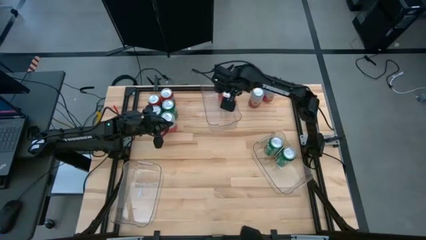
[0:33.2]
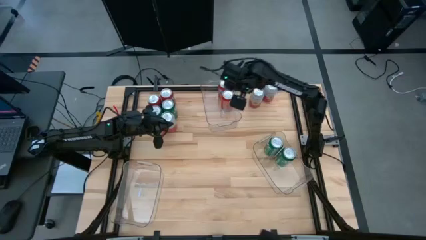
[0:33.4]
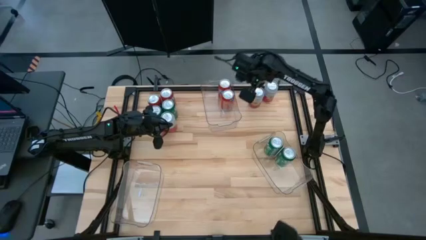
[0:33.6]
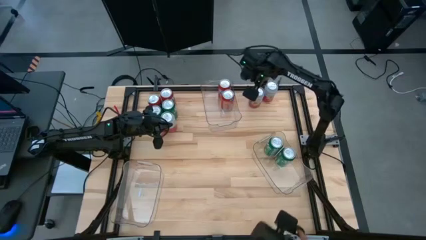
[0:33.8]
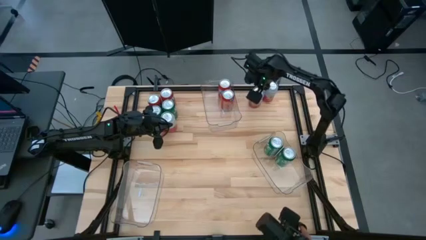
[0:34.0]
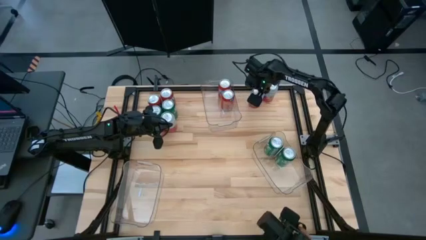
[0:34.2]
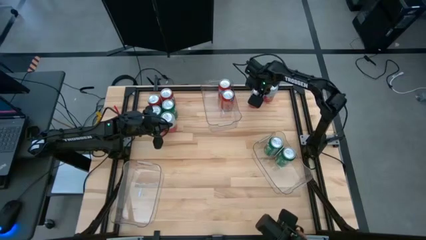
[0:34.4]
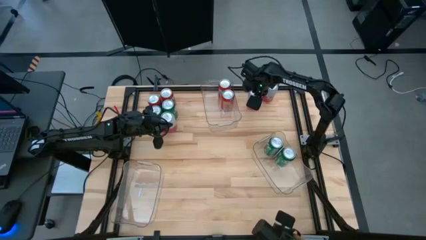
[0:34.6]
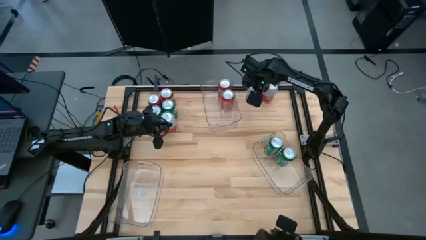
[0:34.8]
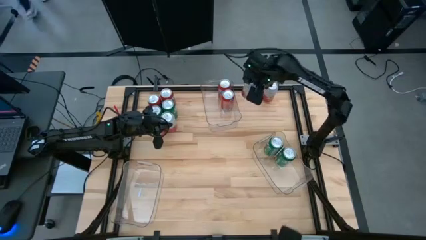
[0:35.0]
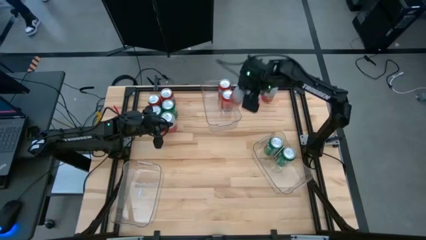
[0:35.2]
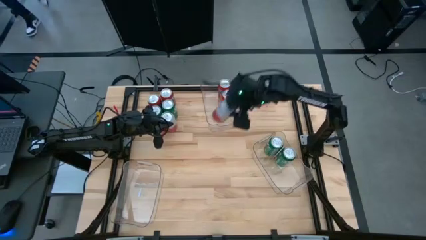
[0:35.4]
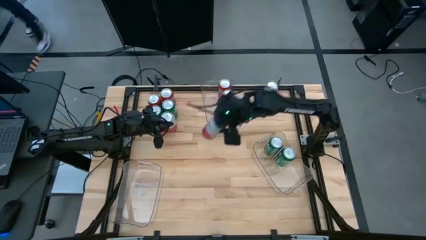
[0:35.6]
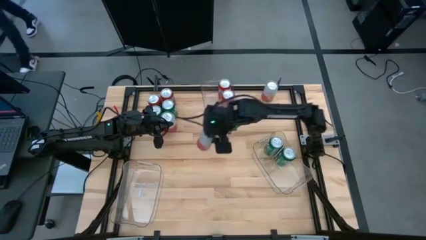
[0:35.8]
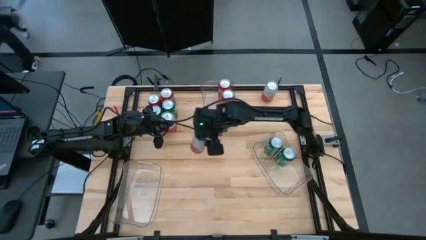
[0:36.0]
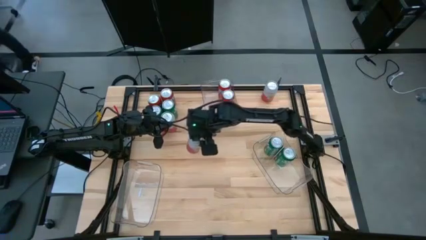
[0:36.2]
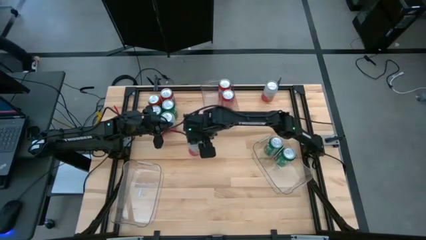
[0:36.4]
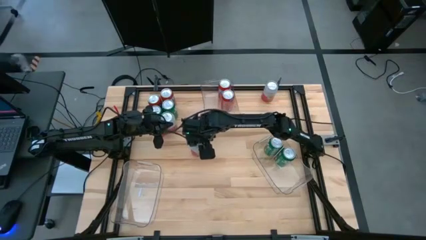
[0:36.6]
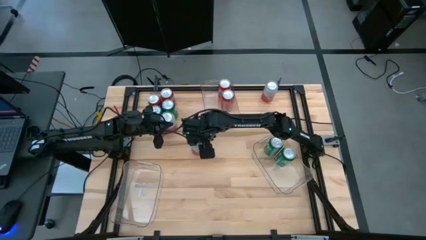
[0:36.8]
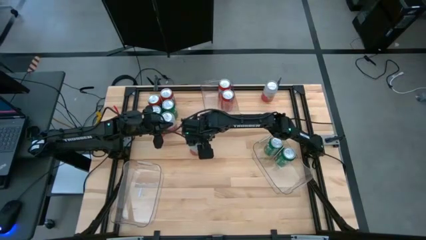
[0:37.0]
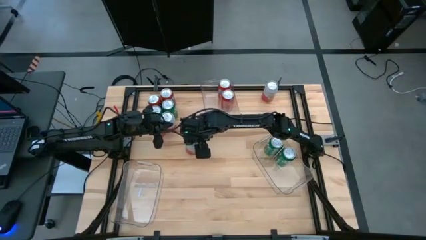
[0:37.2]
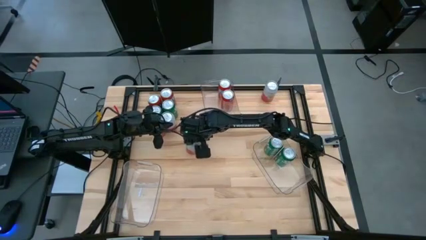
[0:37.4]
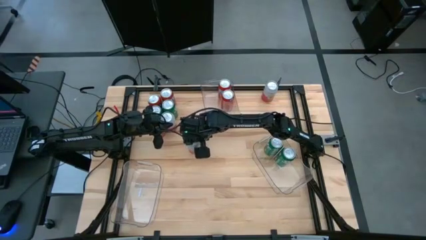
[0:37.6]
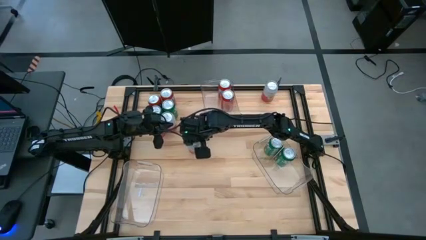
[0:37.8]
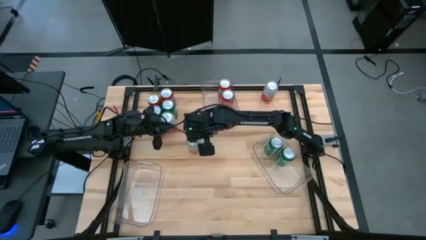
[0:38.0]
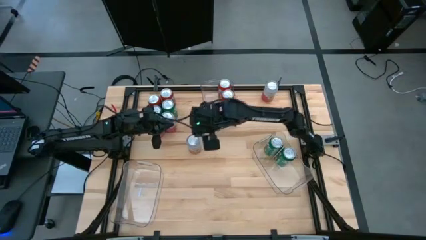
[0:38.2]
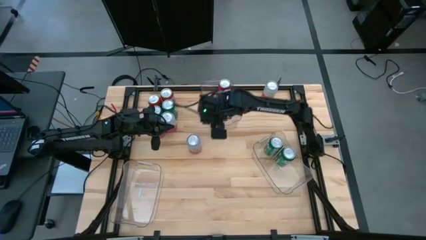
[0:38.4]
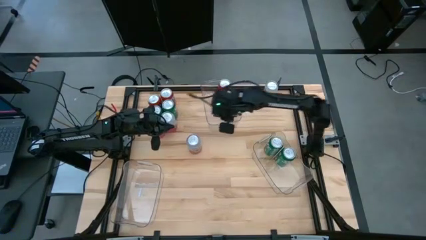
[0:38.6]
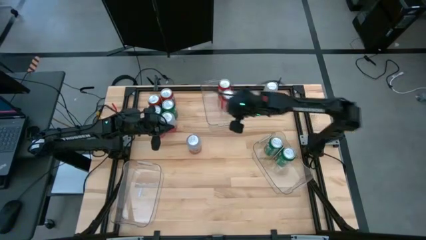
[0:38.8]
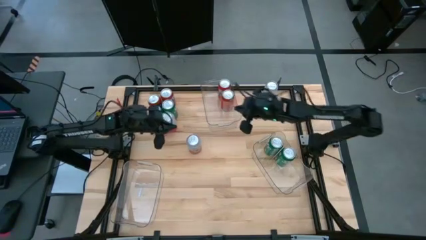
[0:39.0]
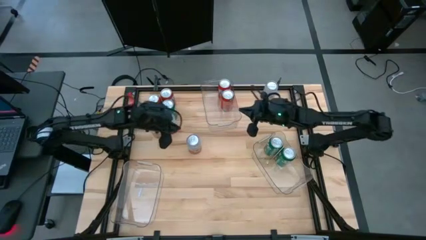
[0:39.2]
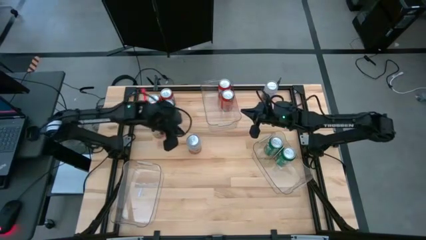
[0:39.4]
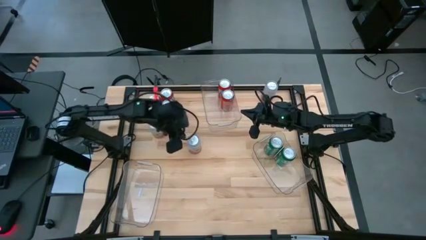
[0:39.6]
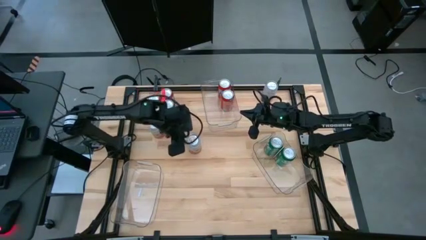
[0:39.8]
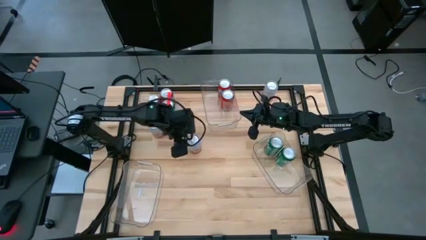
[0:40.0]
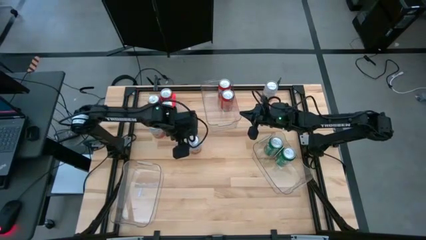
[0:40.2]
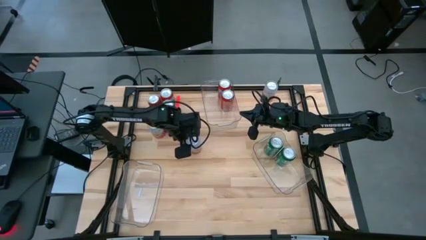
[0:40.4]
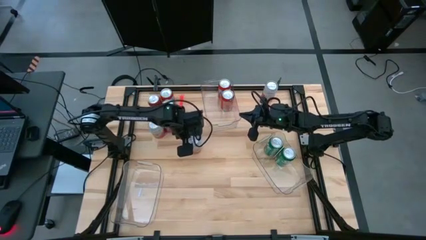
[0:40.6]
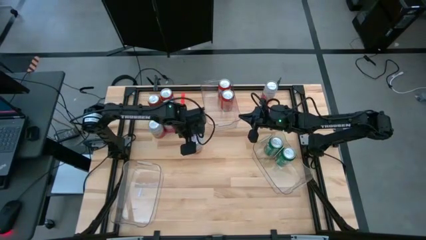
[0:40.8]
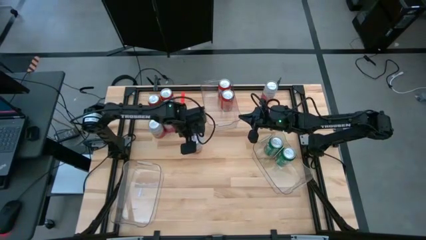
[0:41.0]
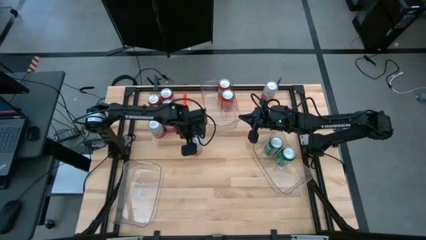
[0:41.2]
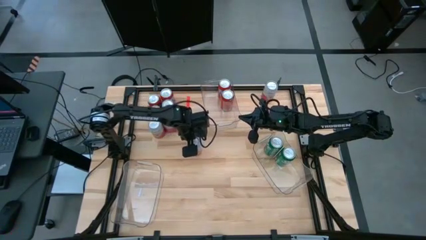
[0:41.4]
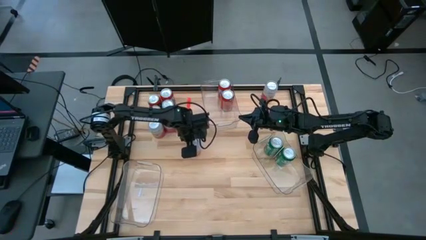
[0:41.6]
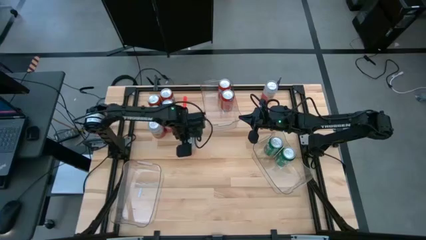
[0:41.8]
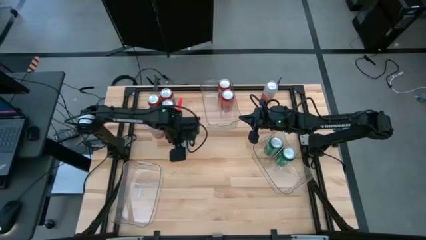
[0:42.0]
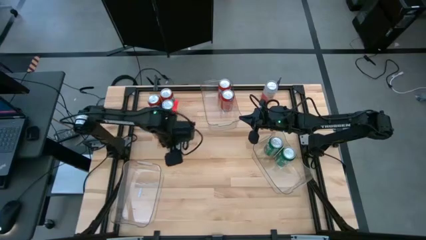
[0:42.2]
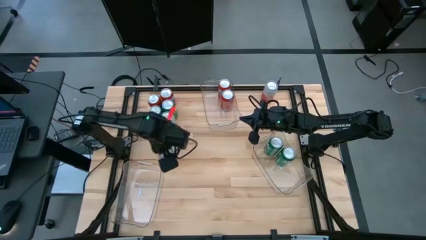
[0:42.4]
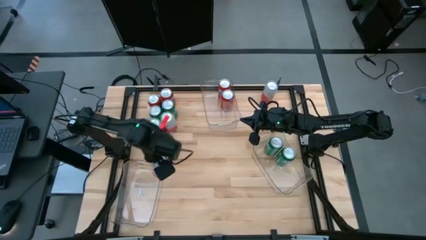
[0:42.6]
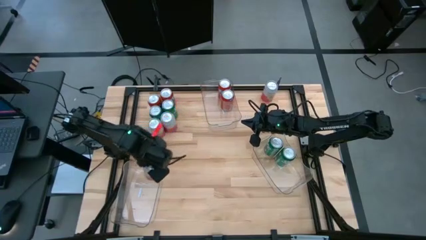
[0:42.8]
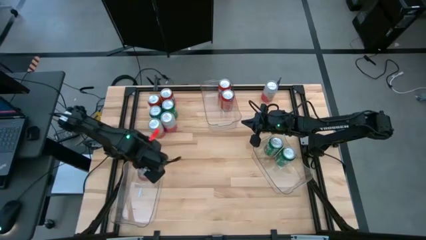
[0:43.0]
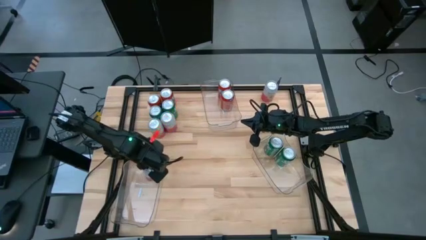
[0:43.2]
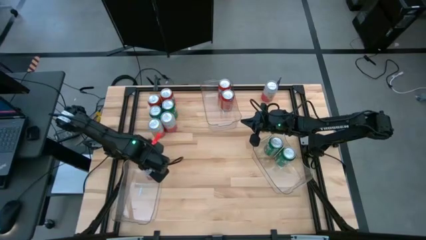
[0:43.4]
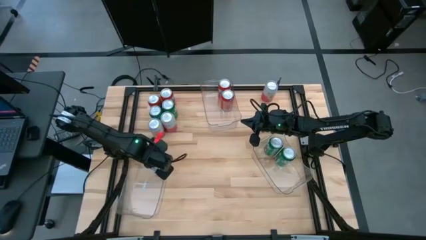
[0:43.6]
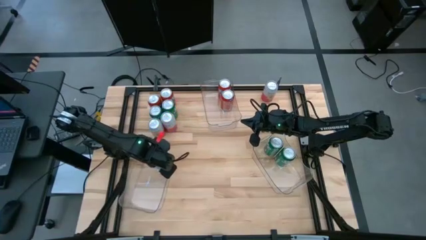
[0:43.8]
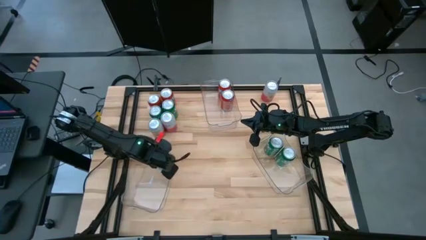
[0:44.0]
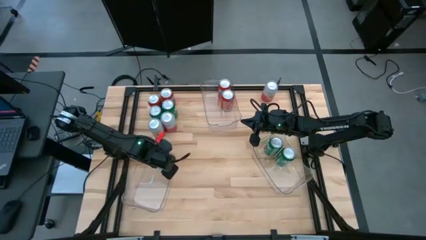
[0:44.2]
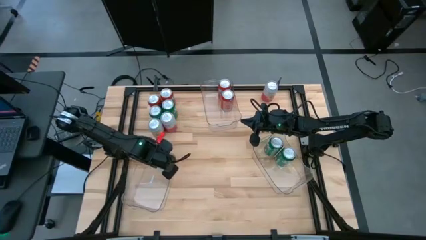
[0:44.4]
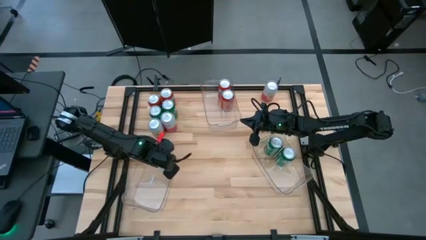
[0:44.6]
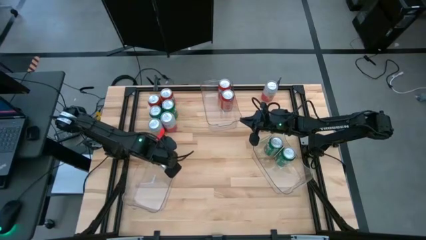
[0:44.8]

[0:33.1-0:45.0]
Task: Sort soda cans
Put the top left pink soda can into the bottom left transparent bin

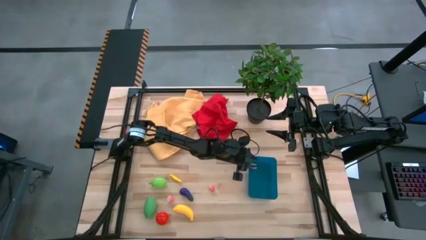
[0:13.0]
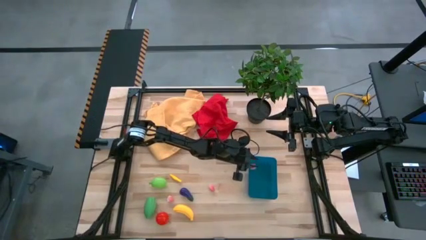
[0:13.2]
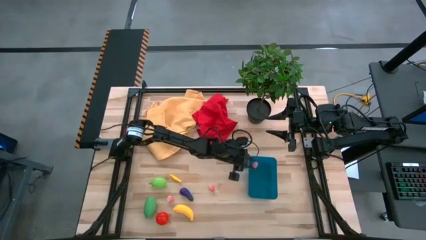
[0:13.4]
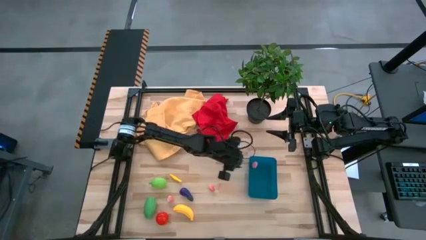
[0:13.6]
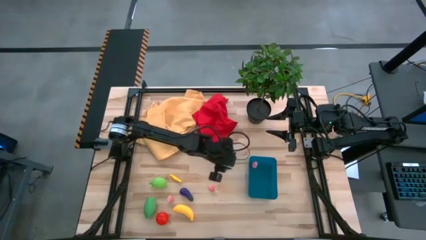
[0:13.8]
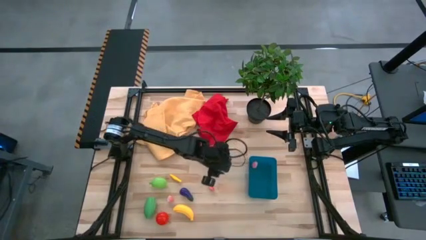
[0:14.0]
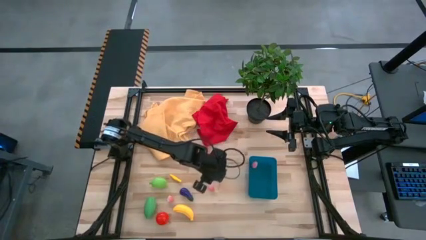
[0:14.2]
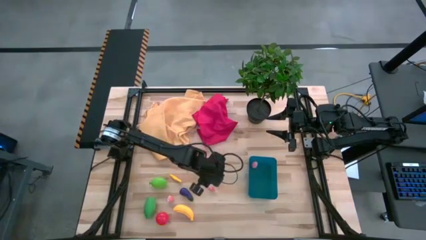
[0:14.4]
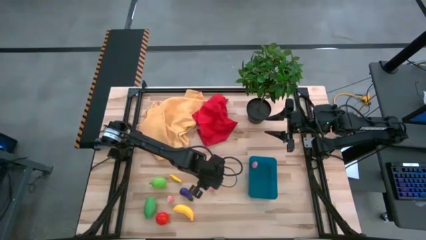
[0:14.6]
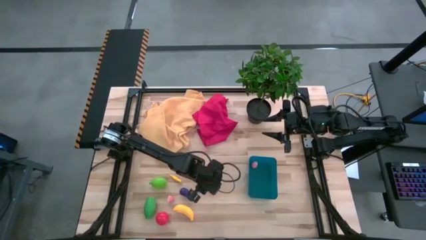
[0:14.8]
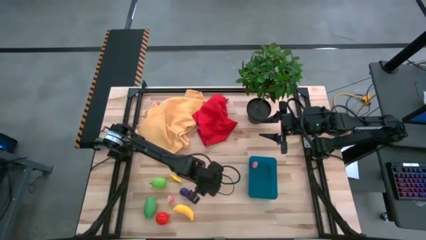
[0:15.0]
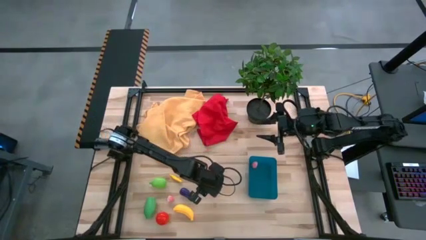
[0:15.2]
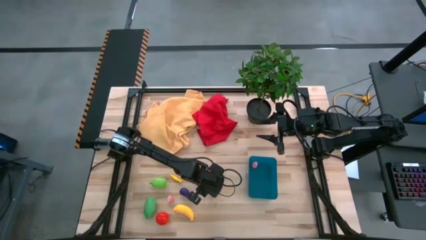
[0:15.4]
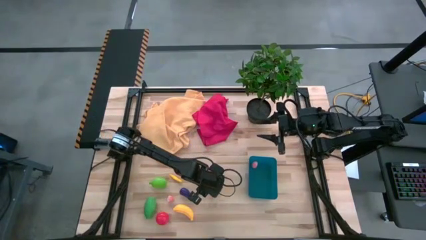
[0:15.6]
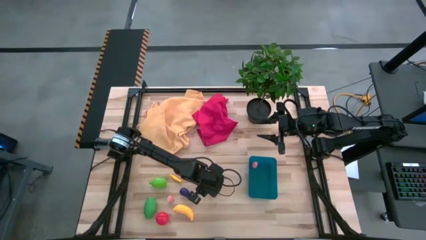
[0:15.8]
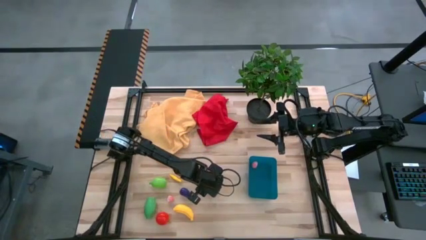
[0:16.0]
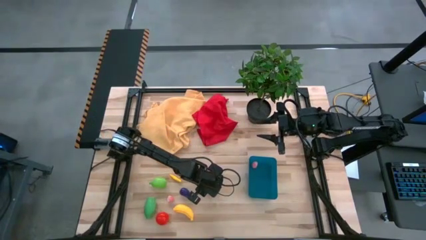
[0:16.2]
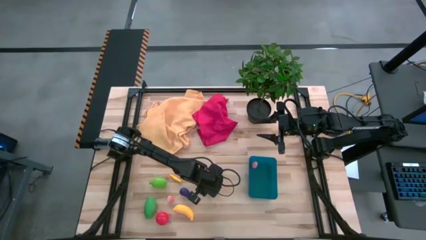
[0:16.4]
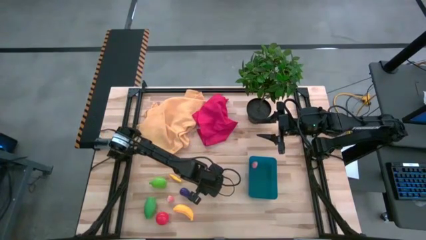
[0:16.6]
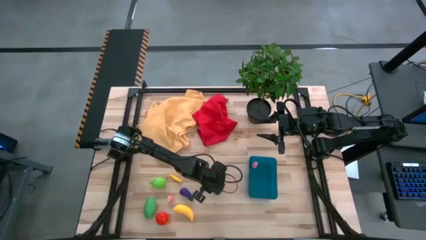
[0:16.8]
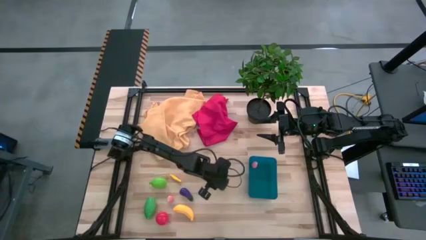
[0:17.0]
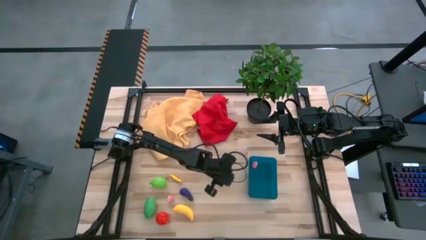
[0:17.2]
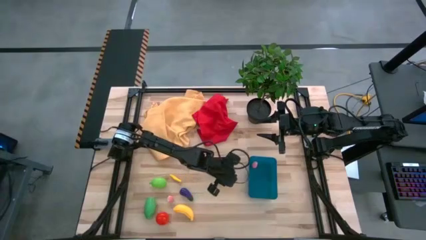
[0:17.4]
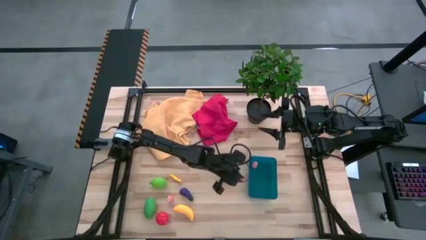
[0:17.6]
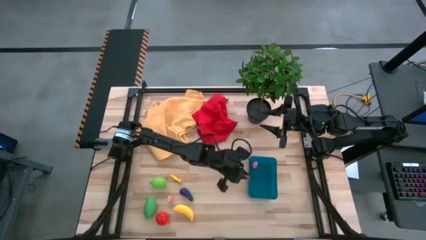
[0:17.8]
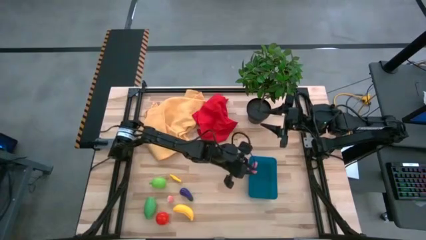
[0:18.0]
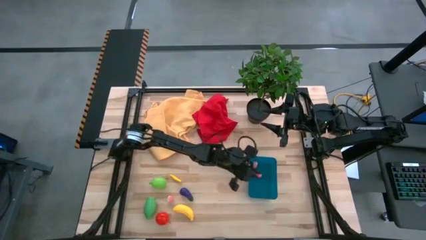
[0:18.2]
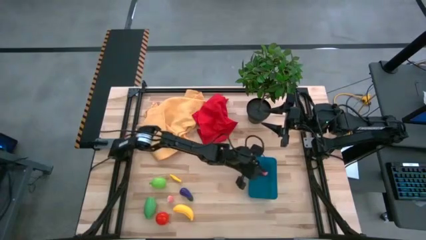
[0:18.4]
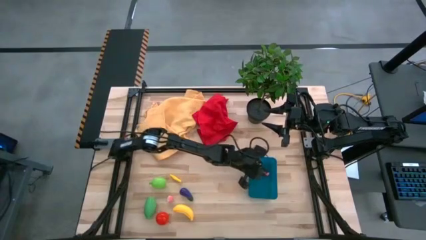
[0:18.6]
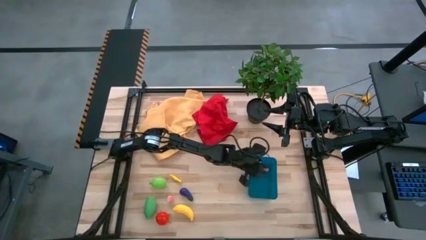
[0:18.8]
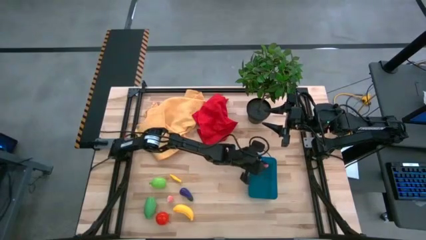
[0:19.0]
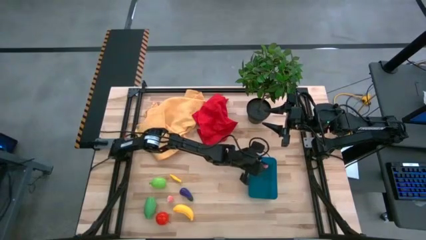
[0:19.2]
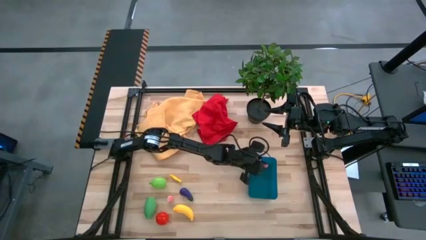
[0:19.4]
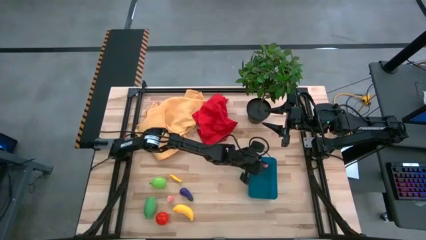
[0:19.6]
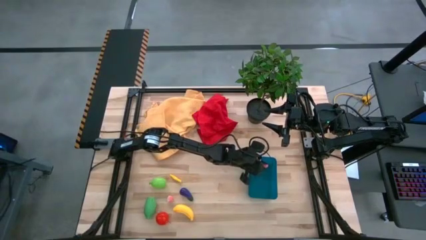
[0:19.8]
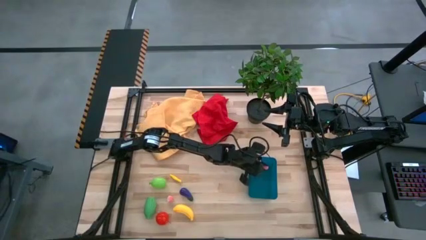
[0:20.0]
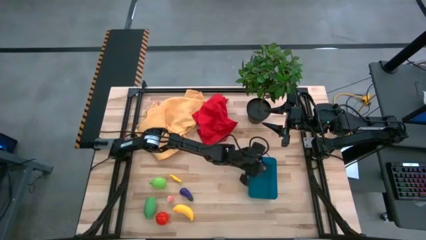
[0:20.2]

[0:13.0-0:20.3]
Task: Pick and placing Produce into tupperware
Put the right peach into the blue bin
